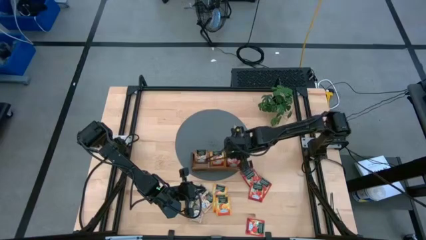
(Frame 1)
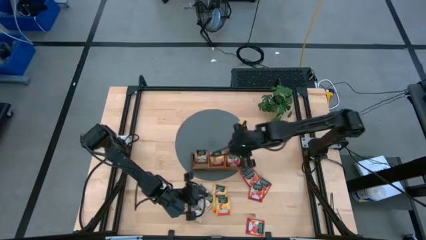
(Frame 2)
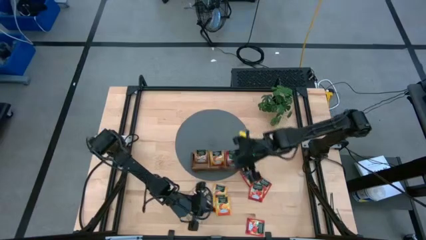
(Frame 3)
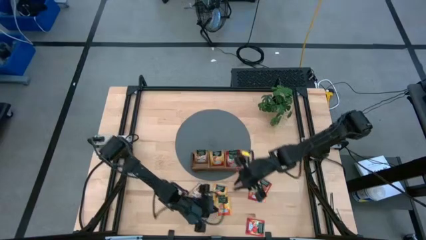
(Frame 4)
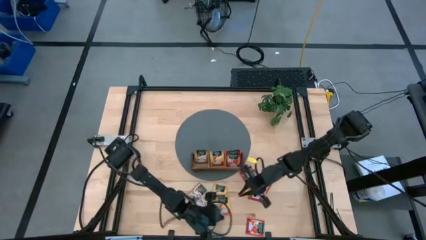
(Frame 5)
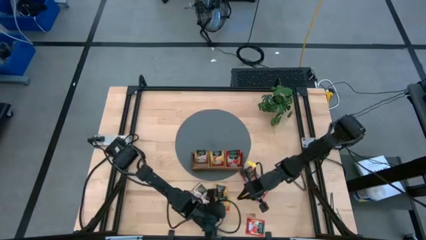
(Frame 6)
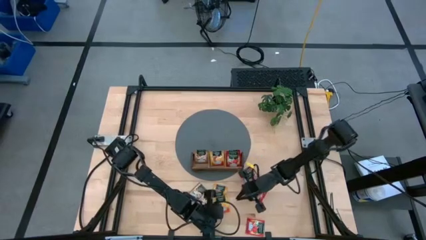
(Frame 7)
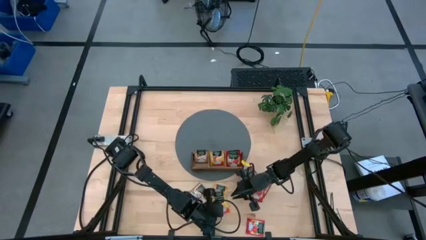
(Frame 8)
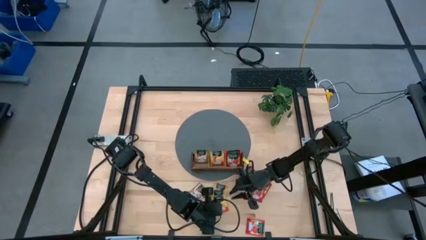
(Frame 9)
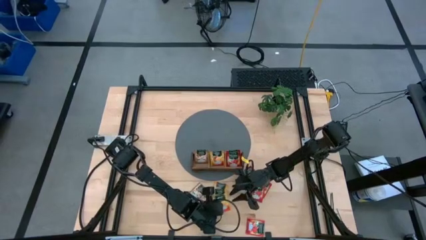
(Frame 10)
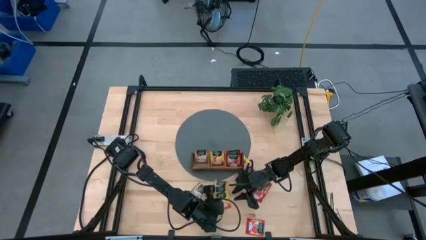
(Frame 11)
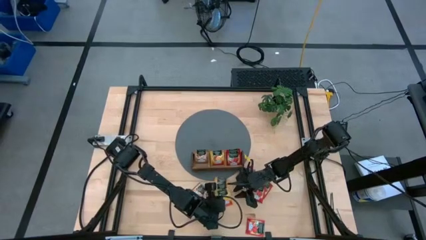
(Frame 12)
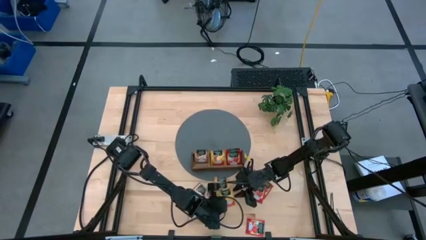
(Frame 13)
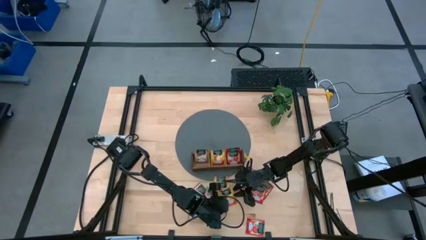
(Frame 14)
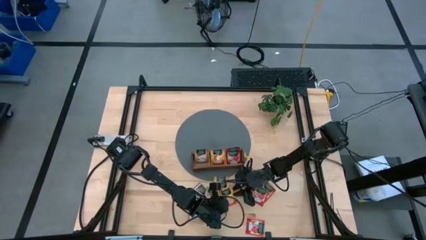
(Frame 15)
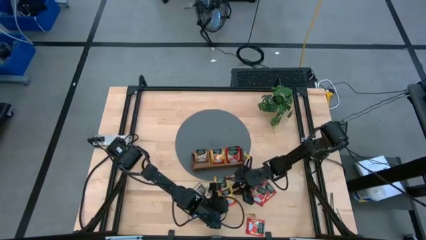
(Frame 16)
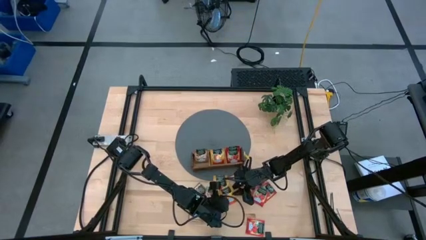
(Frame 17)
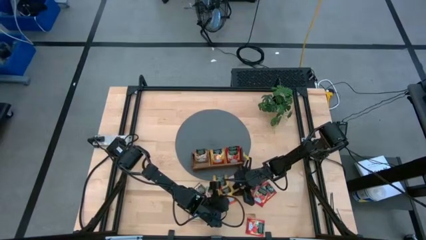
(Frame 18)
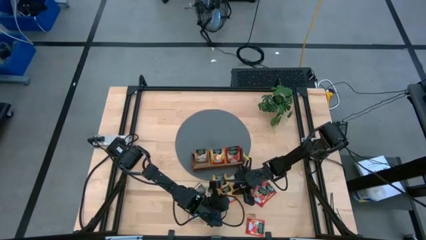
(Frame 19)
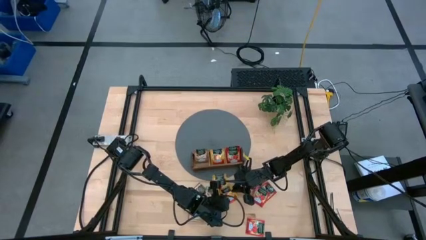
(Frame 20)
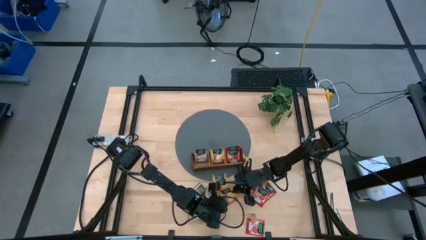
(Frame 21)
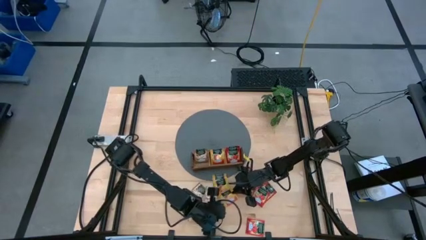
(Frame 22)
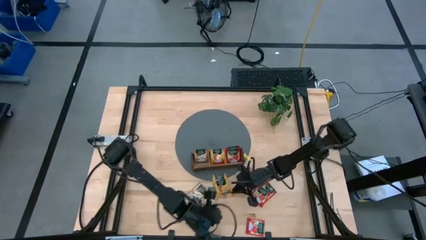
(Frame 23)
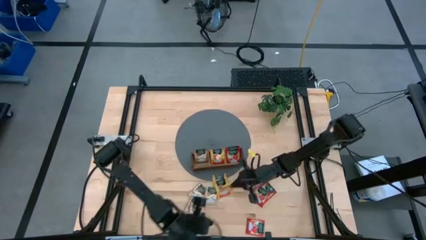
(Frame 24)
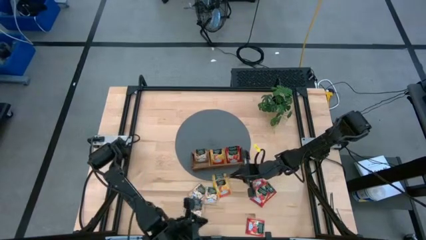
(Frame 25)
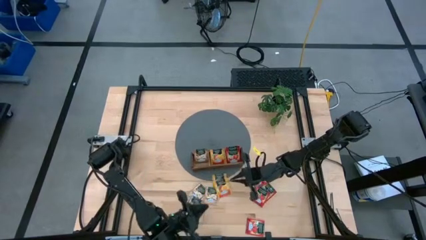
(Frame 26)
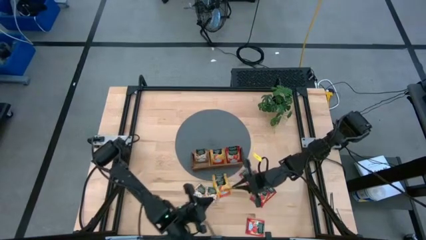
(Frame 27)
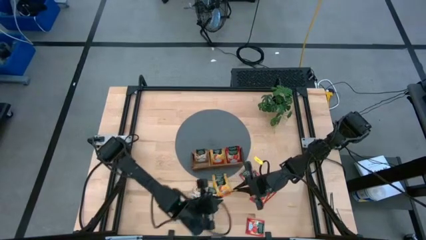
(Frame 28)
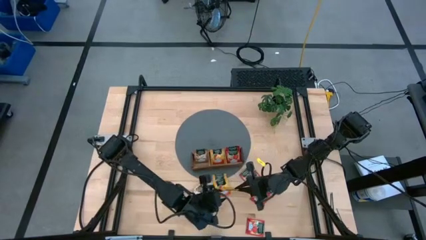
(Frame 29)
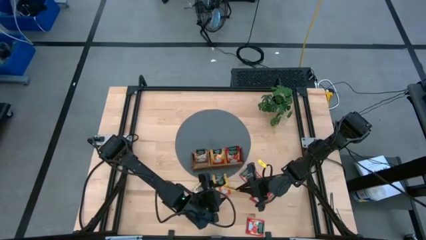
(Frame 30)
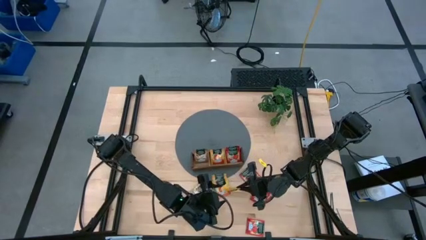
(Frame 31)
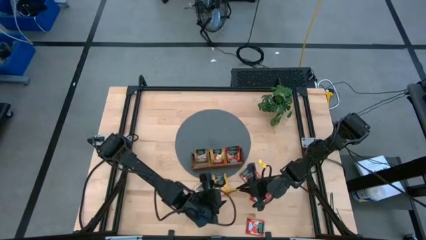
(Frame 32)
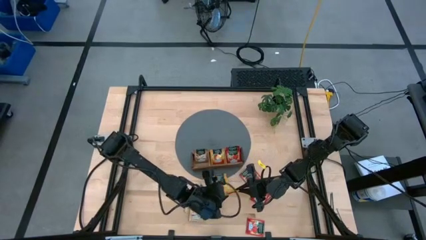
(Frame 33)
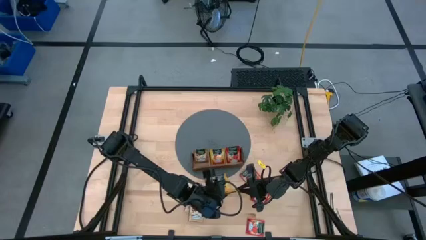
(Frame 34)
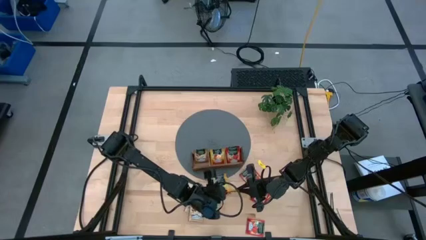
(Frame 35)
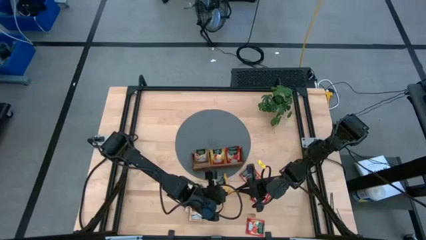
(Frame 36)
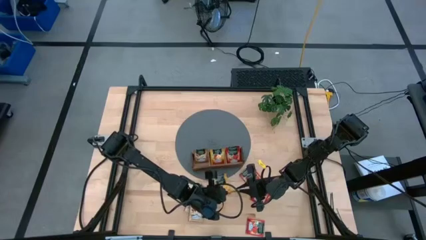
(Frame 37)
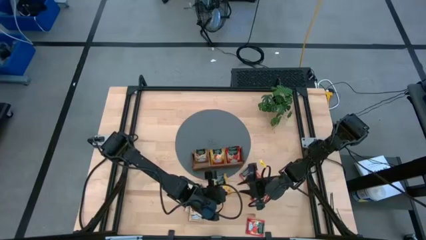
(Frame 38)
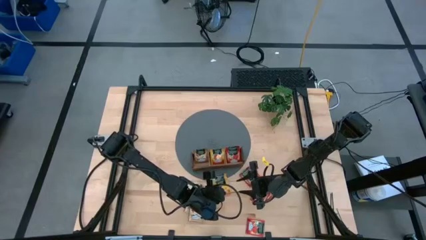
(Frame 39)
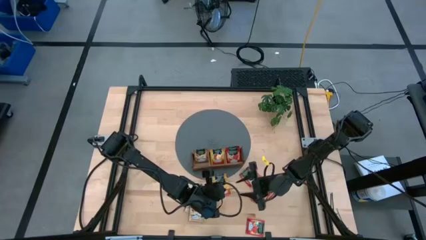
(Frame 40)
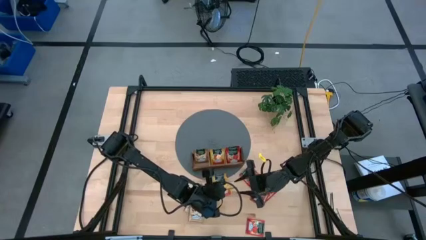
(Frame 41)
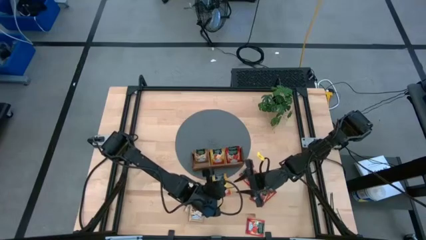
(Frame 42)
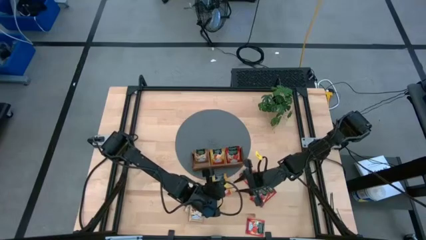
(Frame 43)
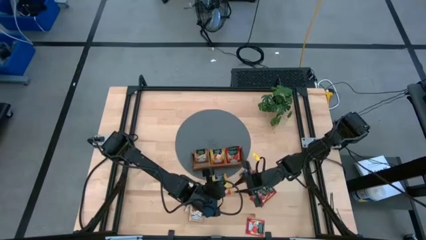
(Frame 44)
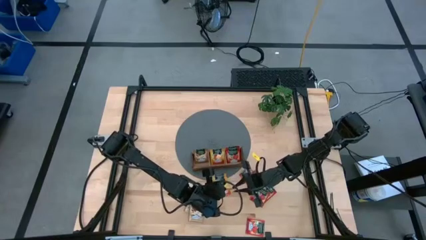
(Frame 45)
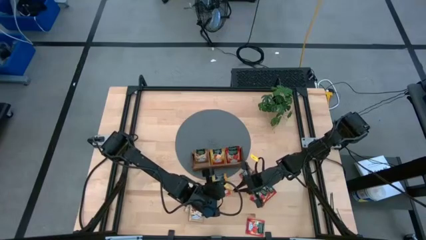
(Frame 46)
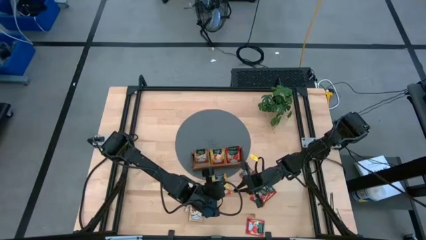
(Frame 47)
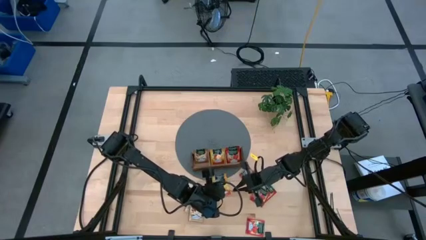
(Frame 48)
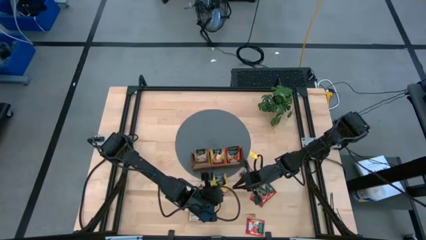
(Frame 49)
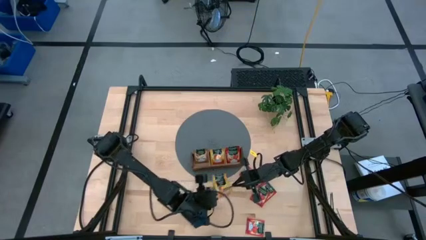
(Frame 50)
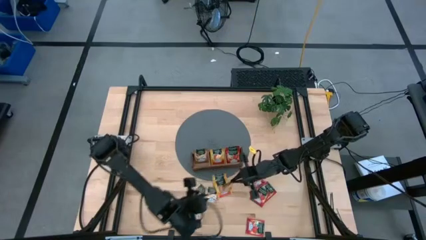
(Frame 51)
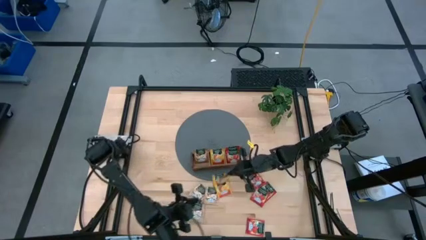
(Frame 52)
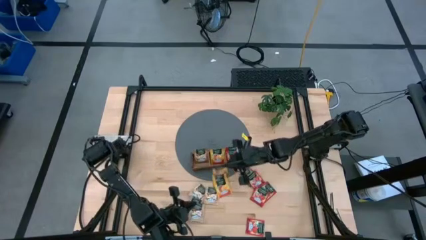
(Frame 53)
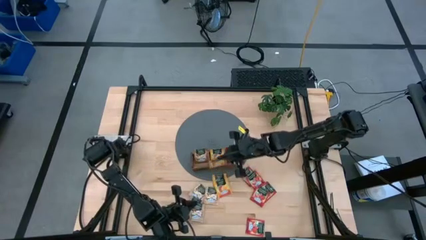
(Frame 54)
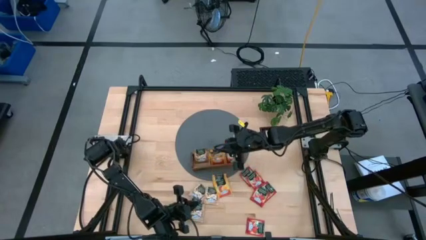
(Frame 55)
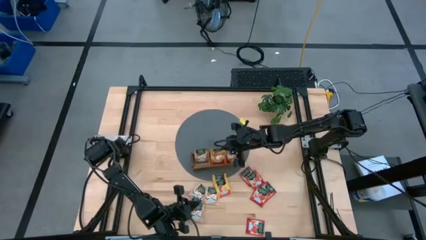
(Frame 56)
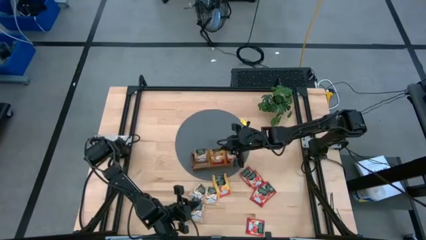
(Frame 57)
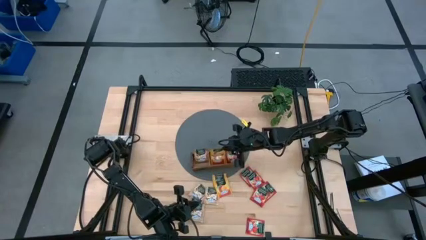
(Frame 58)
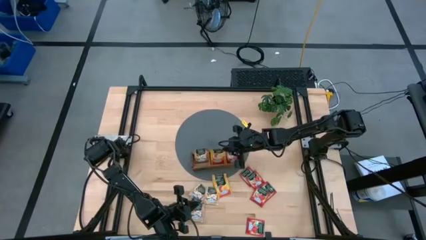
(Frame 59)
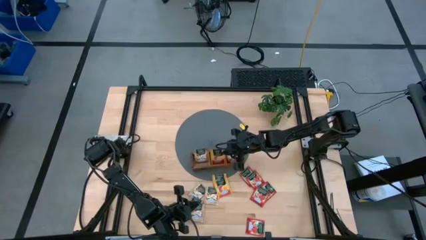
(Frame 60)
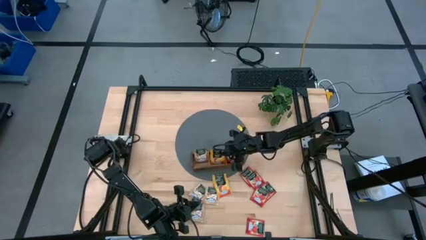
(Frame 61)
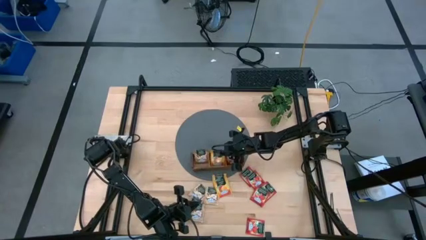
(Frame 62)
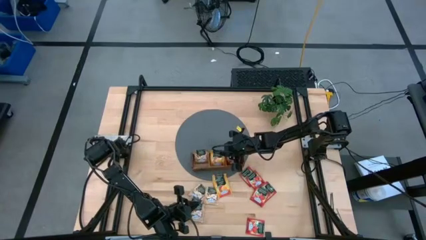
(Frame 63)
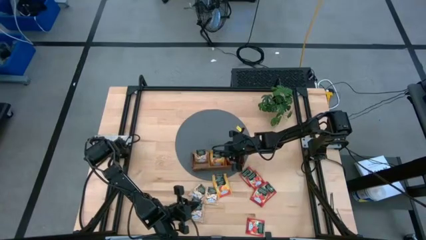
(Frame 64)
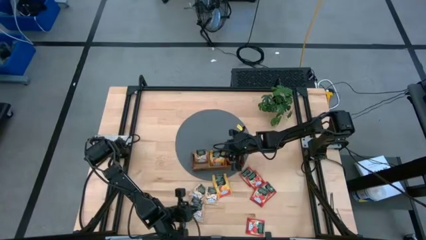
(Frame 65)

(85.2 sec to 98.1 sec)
Task: Pick & Place Tea
Put the top yellow tea bag into the middle section of the wooden organizer

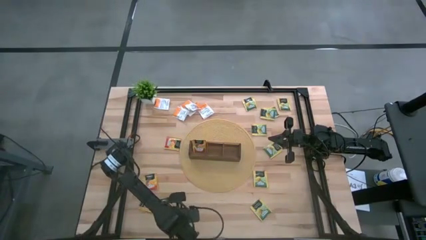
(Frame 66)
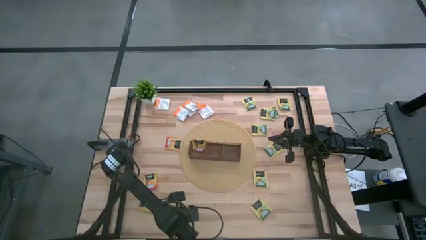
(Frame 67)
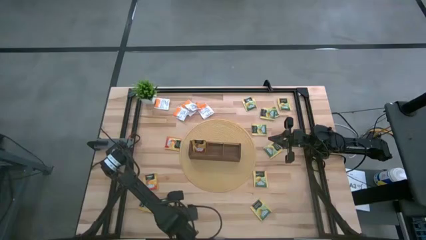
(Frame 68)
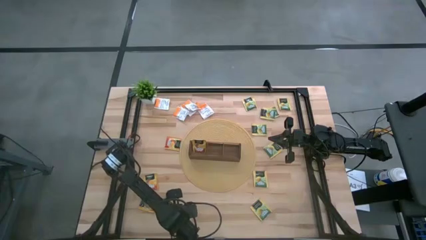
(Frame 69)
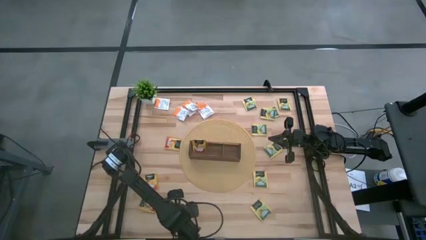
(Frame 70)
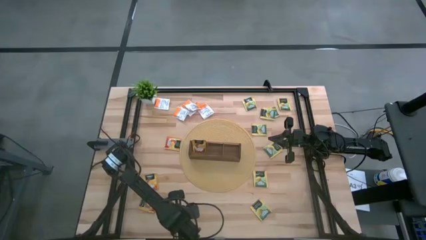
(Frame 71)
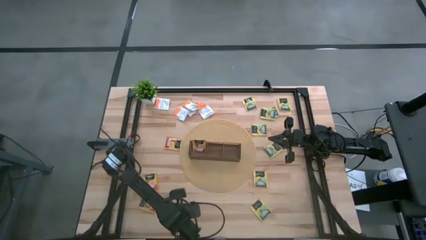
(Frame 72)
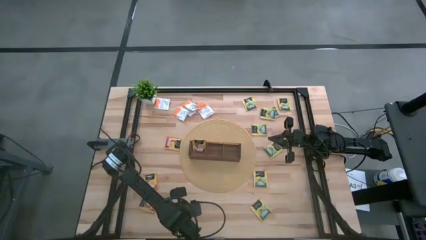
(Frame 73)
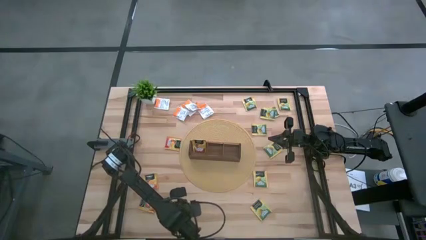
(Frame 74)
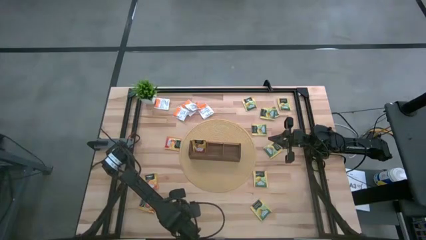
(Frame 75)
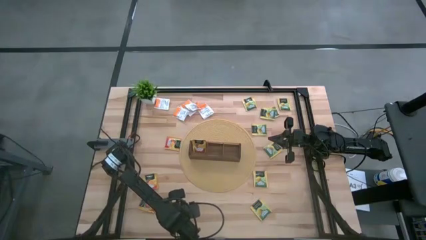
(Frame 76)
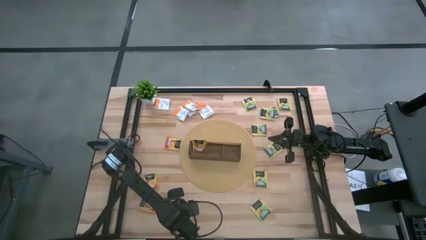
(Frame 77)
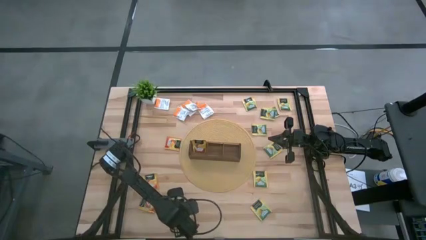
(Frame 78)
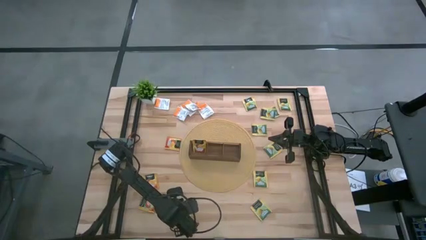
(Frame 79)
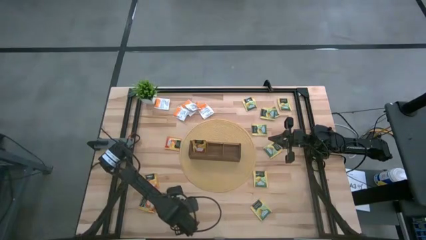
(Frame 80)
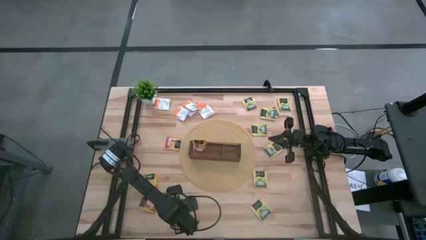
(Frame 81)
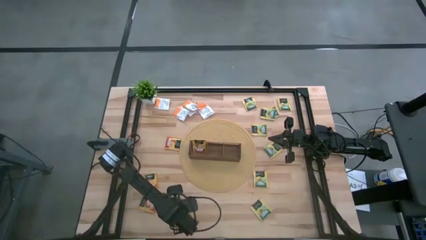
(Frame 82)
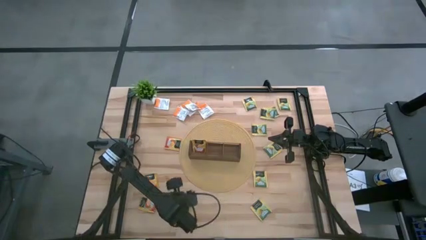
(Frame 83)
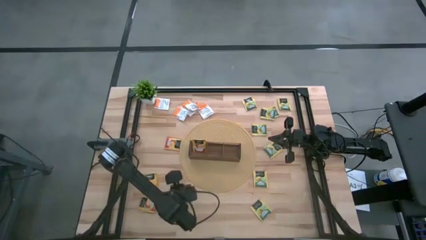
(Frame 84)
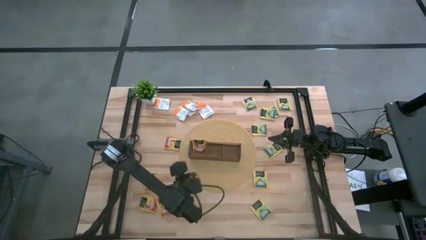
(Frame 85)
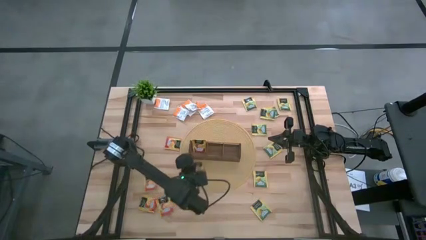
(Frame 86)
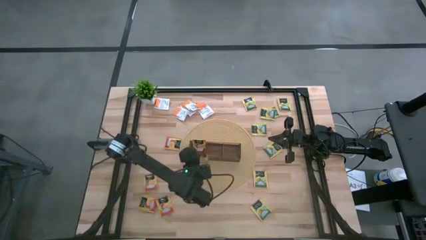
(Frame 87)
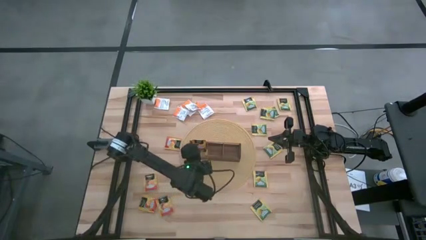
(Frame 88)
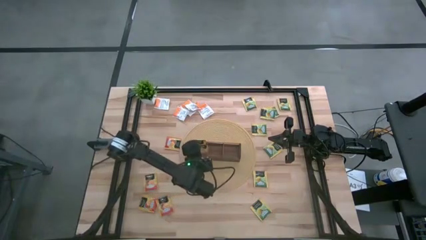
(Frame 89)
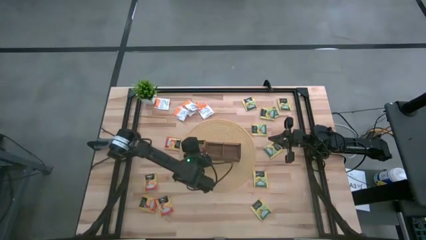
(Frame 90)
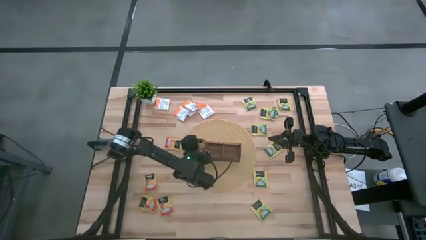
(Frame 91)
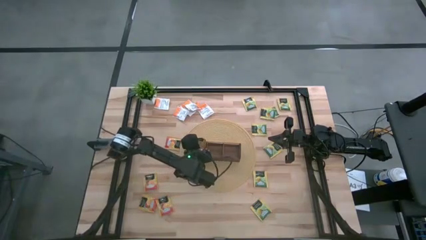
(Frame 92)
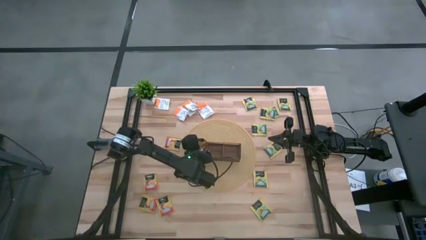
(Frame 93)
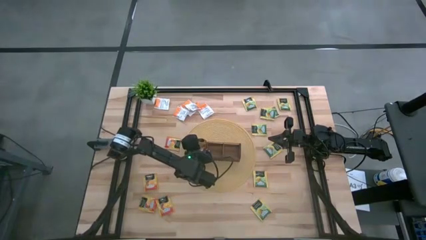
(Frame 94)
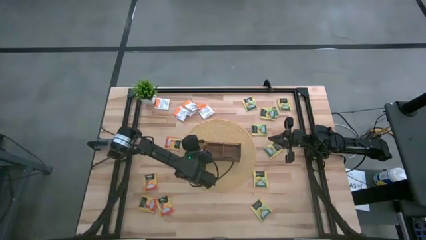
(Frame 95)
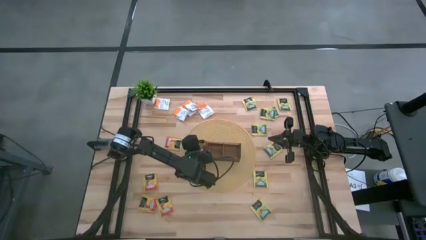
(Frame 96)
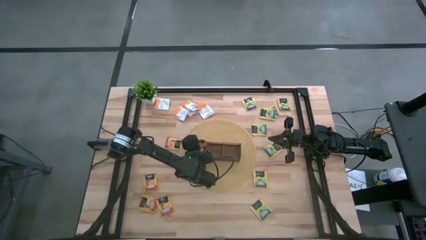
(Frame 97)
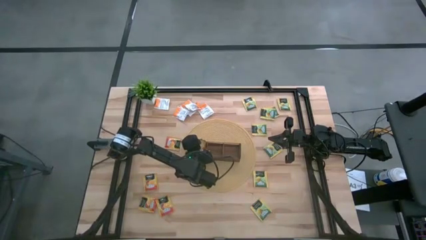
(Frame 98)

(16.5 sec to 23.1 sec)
Task: Pick & Place Tea
Put the mango tea sachet into the left section of the wooden organizer
